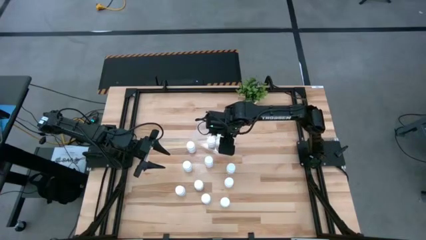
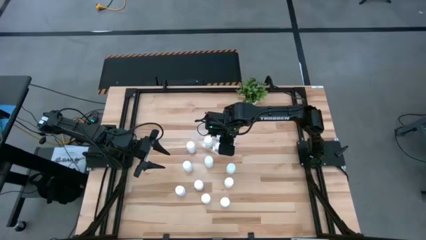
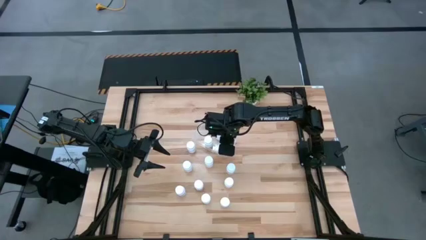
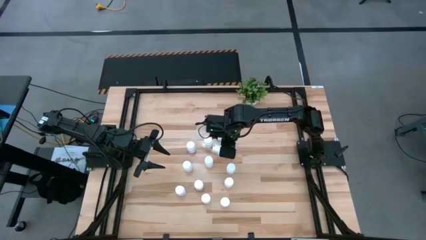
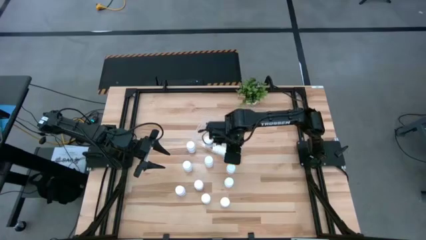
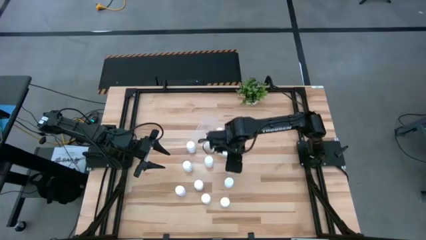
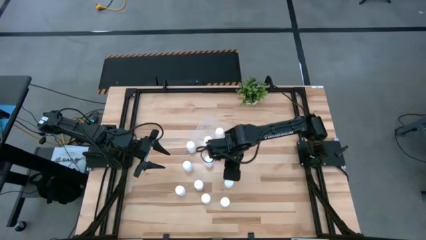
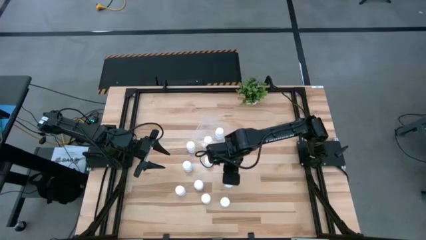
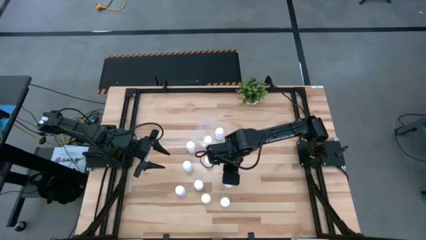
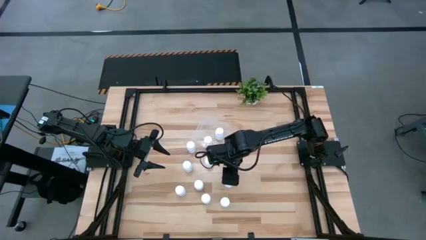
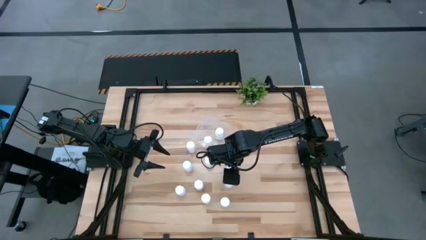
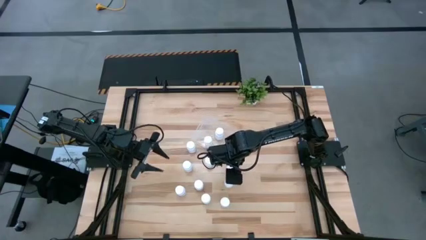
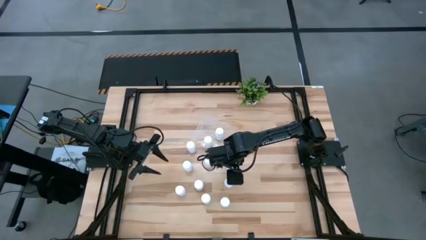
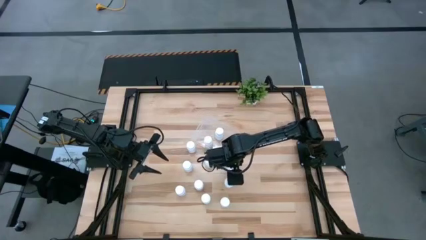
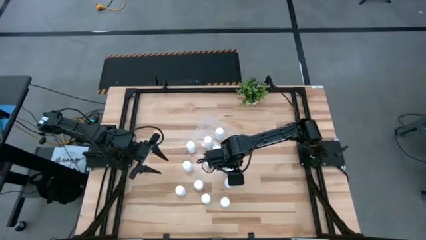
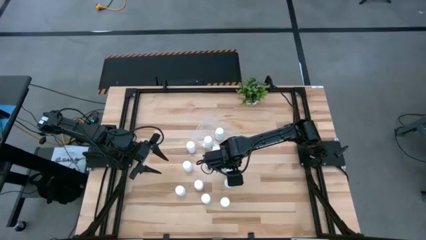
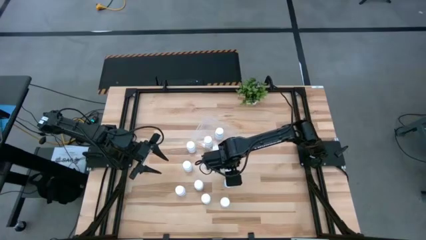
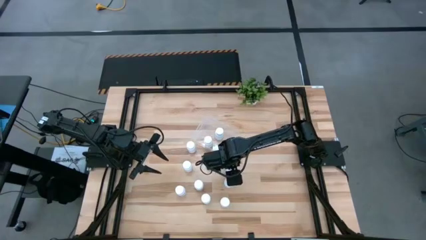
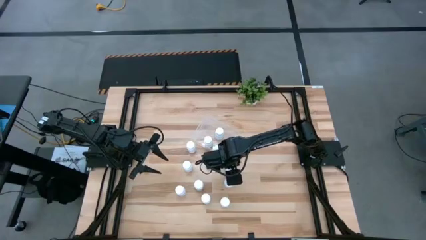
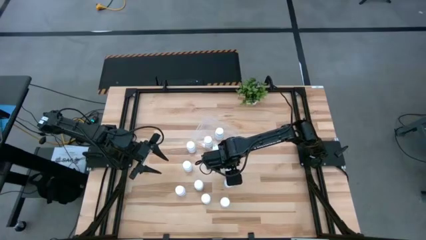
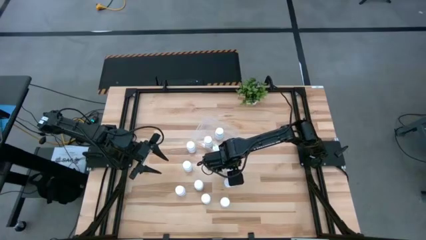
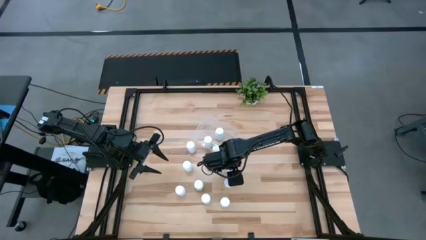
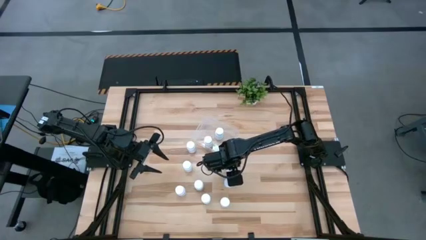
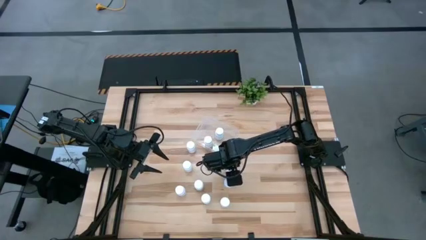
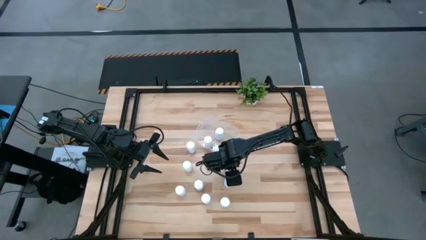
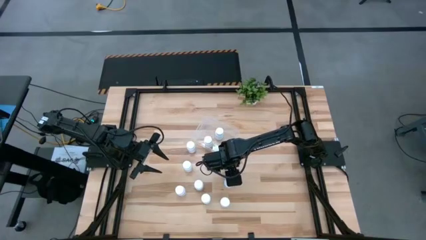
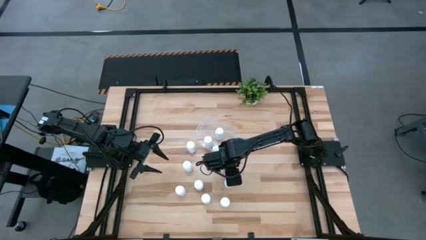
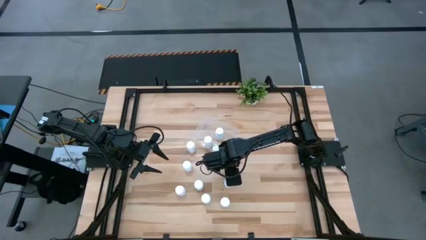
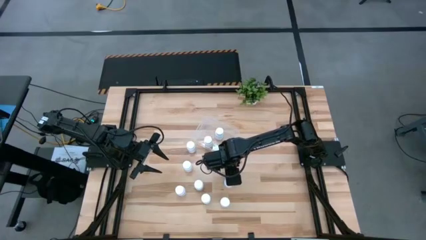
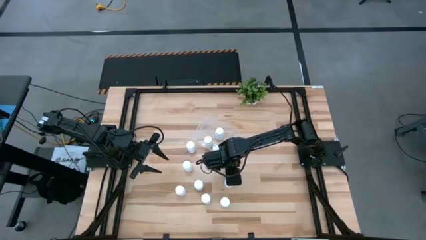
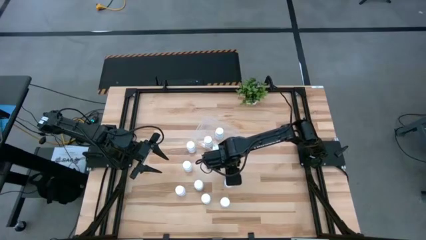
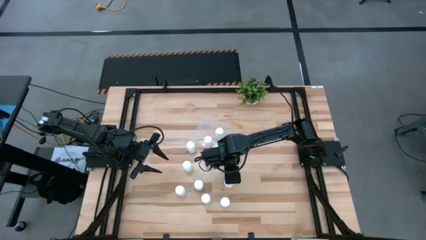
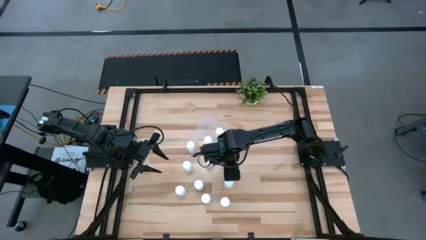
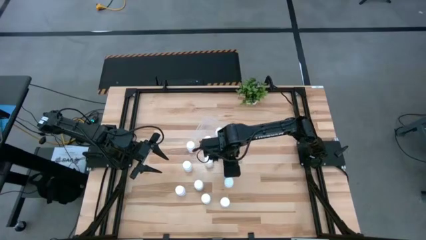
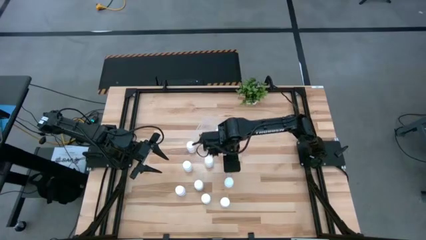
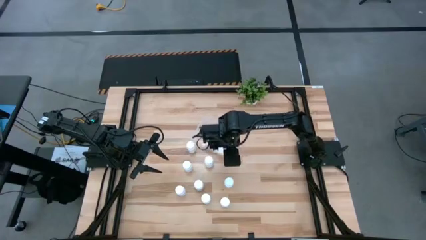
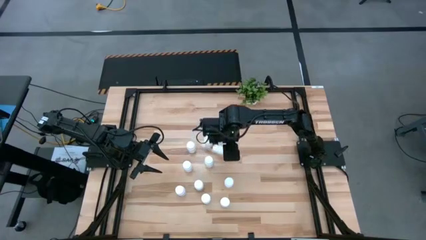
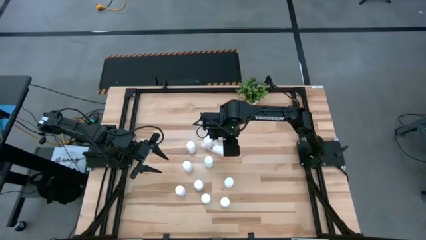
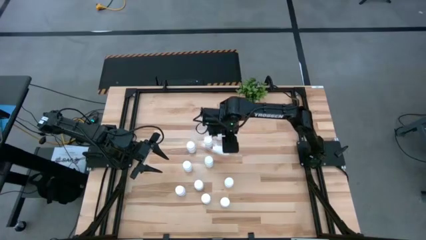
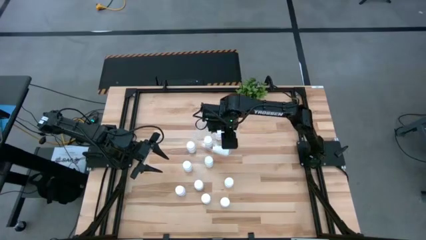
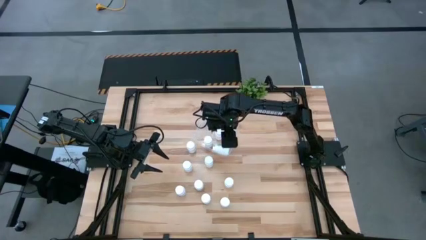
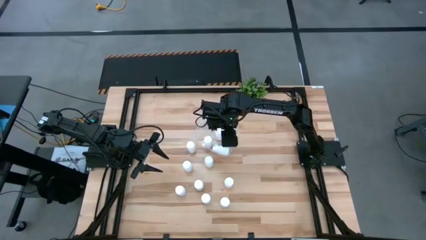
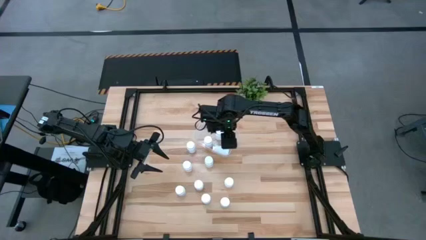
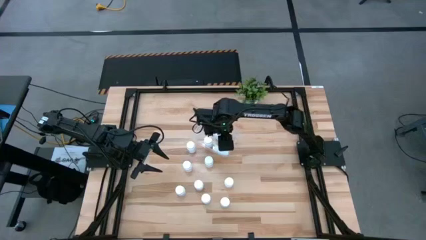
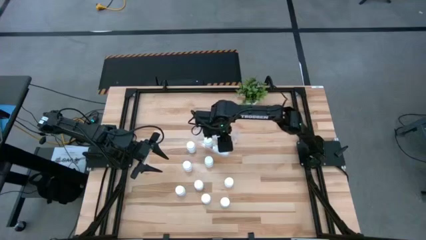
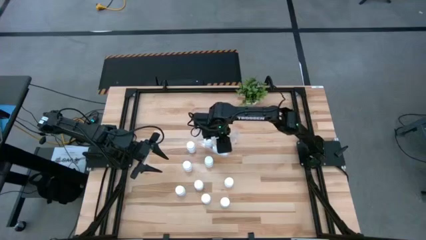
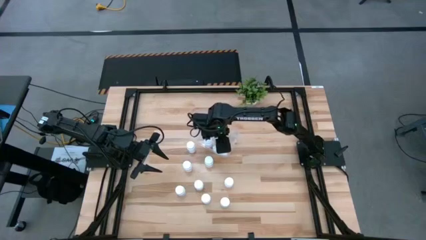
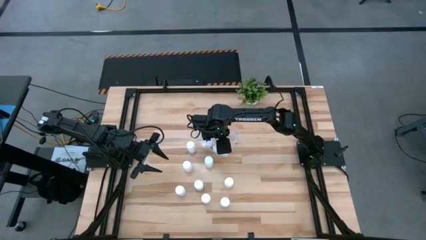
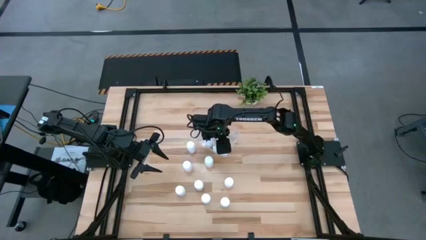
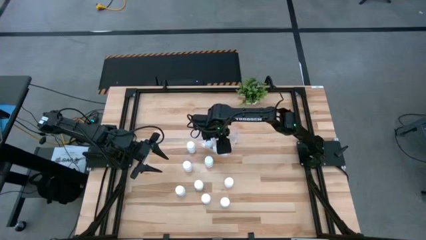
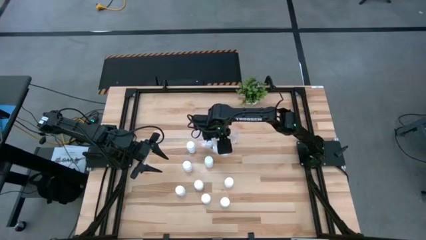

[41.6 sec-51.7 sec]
Task: Pick and place pill bottles into a basket
Put the pill bottle into the bin

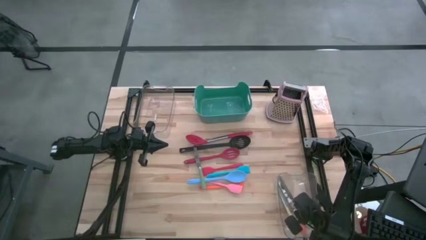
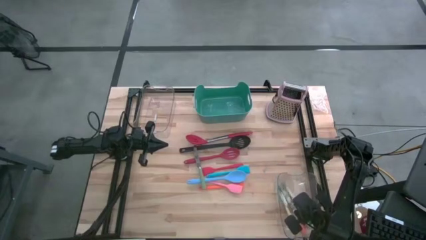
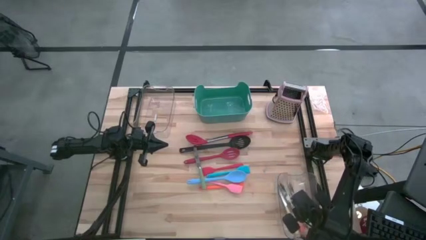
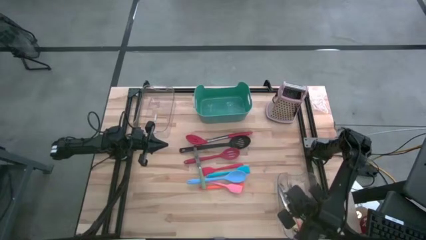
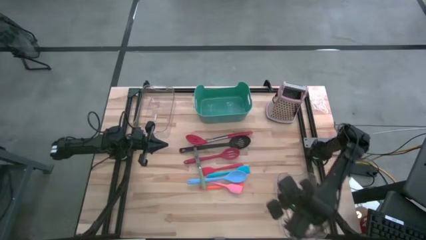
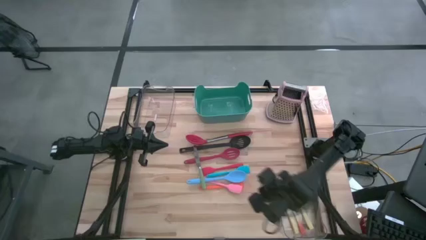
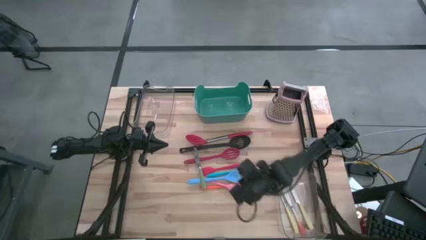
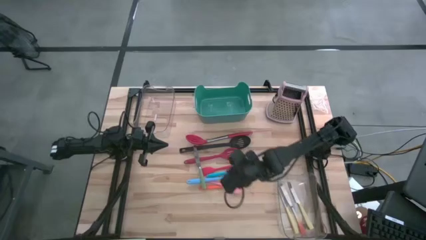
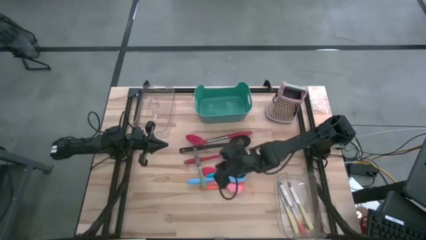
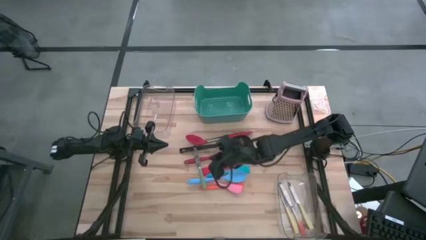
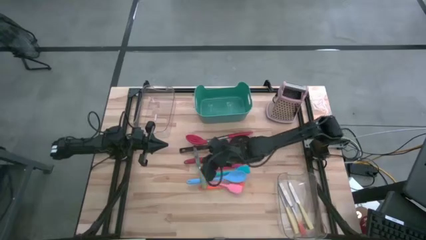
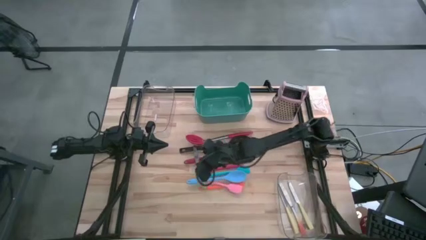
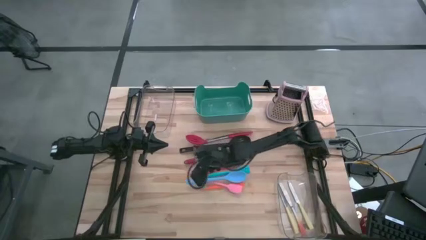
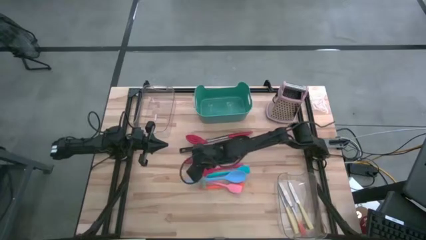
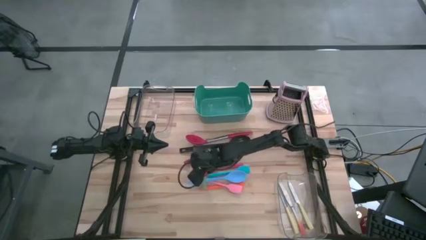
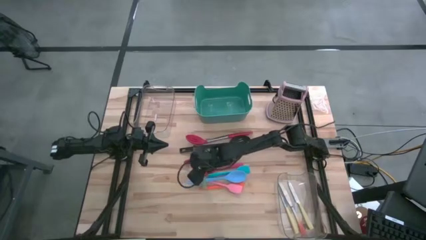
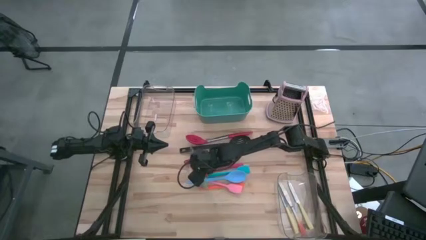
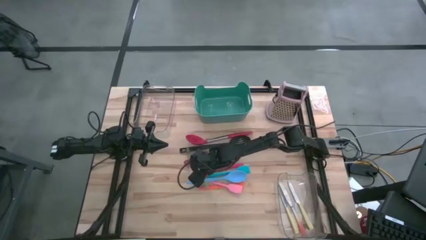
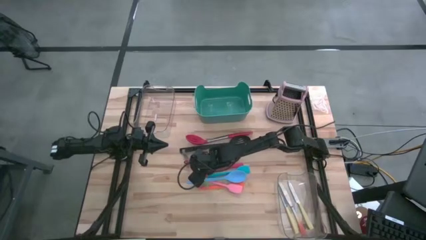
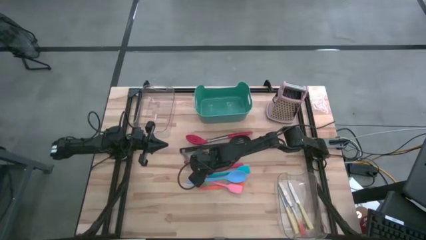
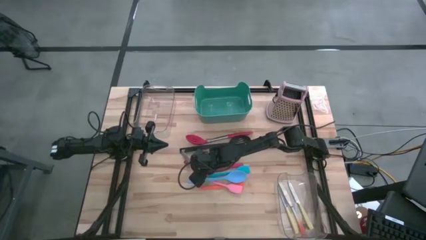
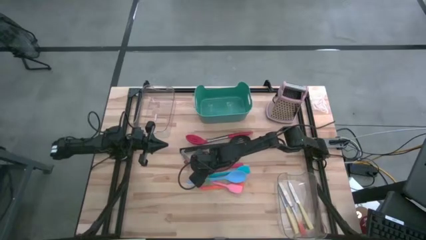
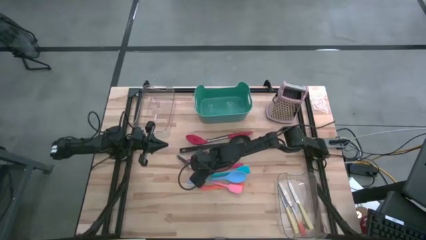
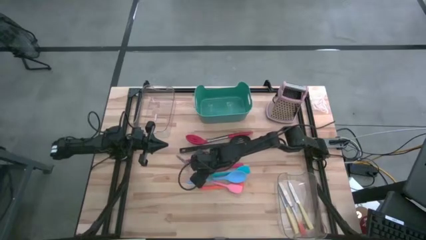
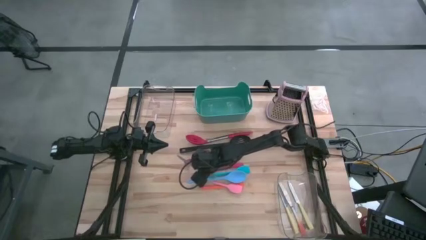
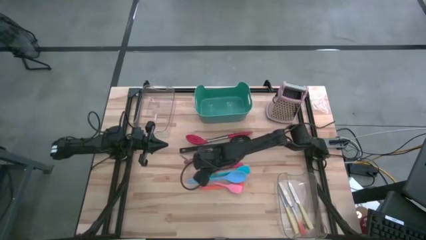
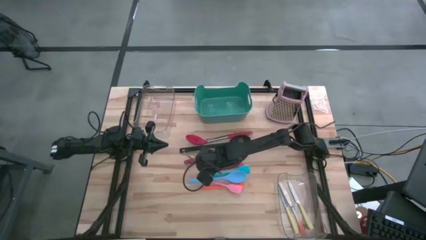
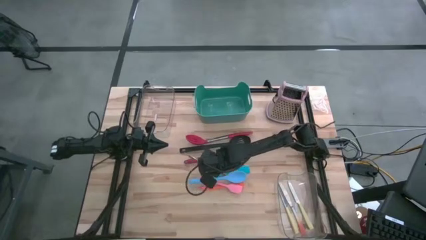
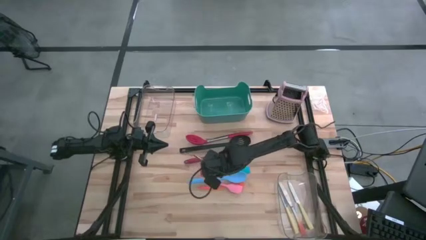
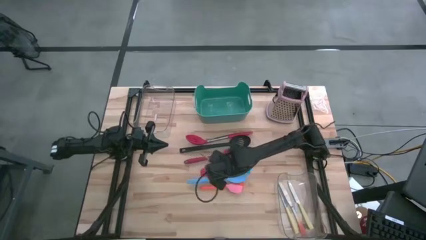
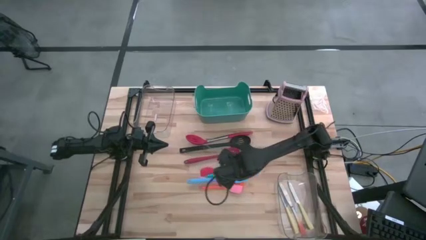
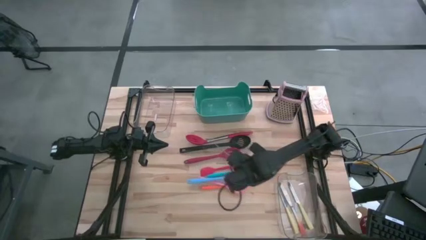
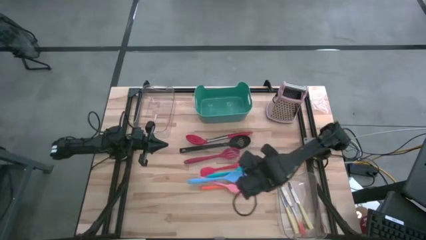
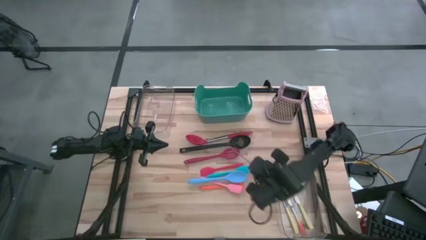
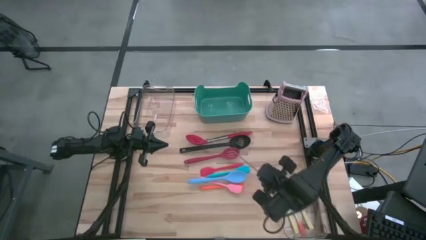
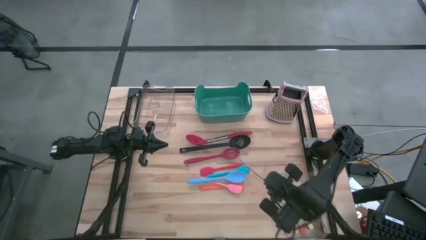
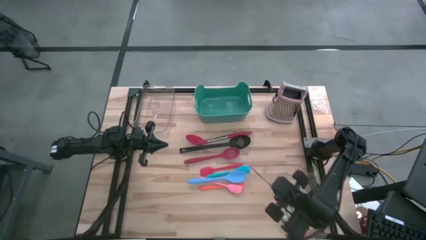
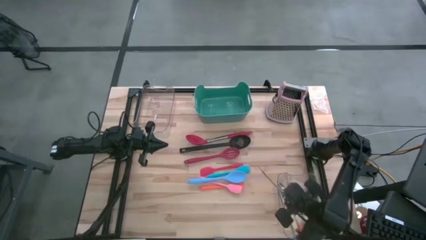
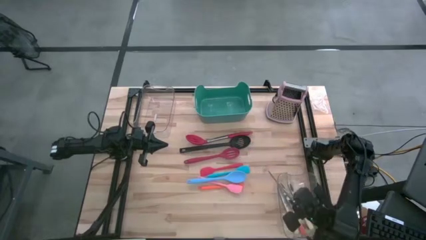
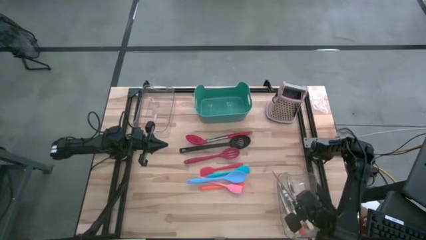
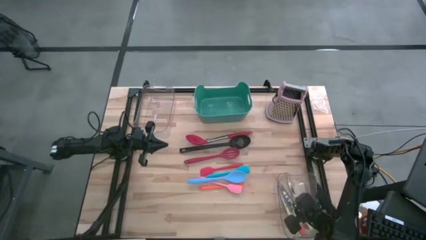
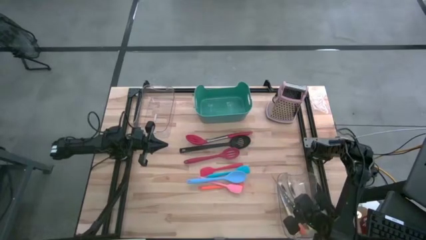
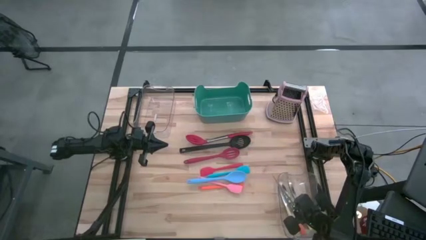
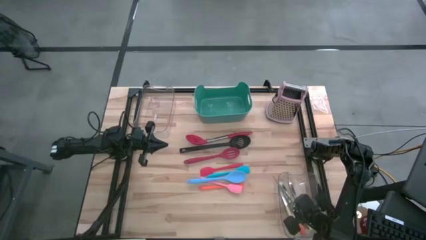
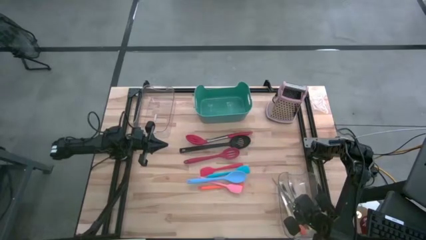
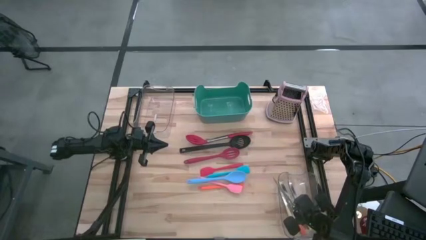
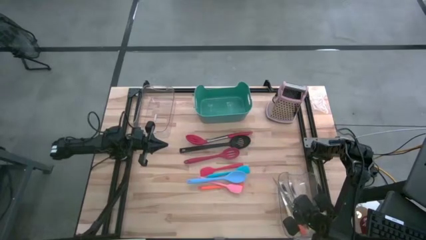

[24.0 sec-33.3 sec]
Task: Pick & Place Kitchen Items
Put the green knife into the bottom transparent bin
